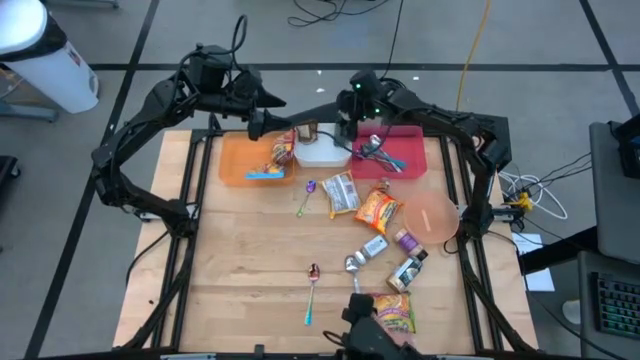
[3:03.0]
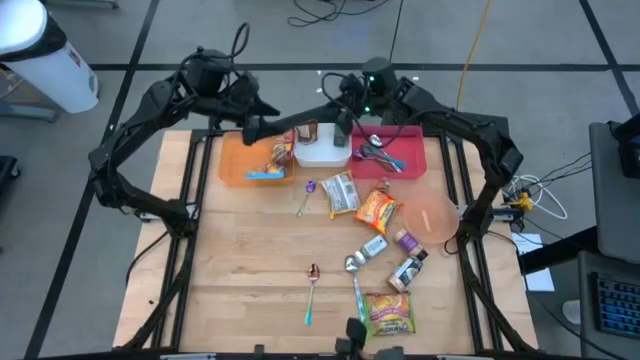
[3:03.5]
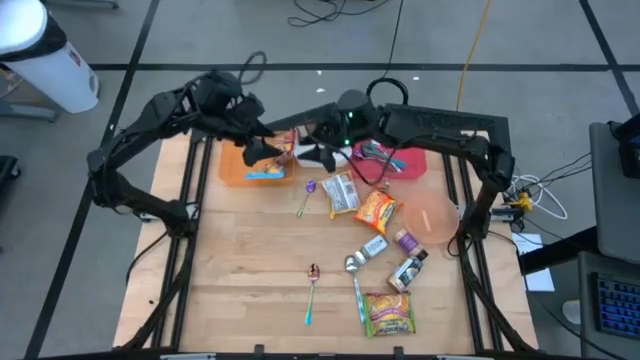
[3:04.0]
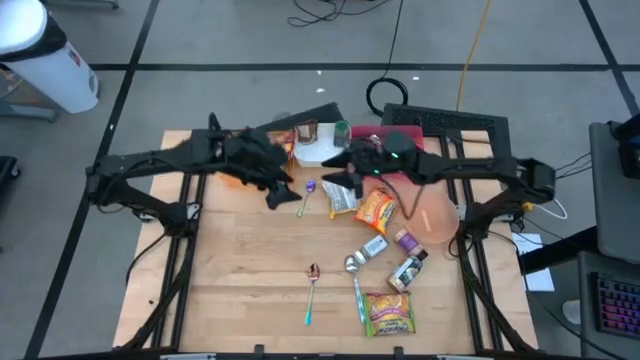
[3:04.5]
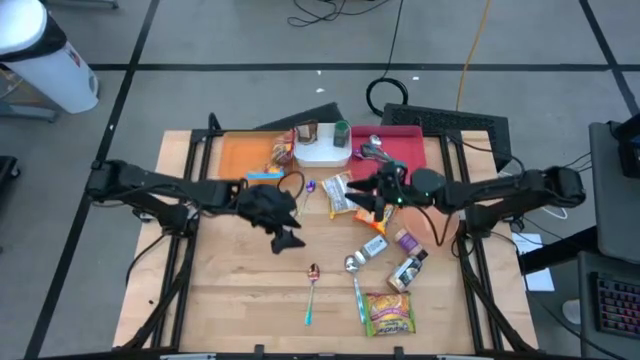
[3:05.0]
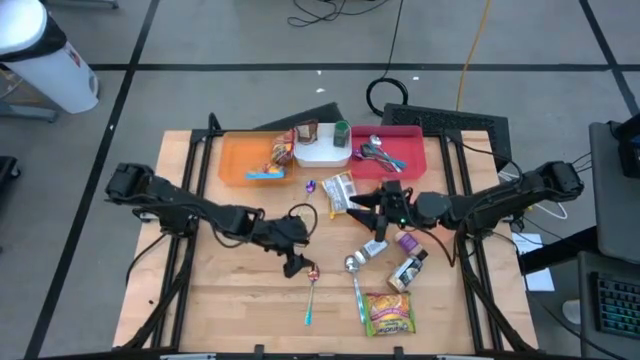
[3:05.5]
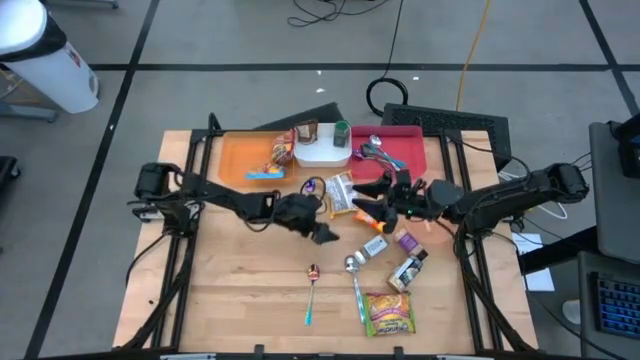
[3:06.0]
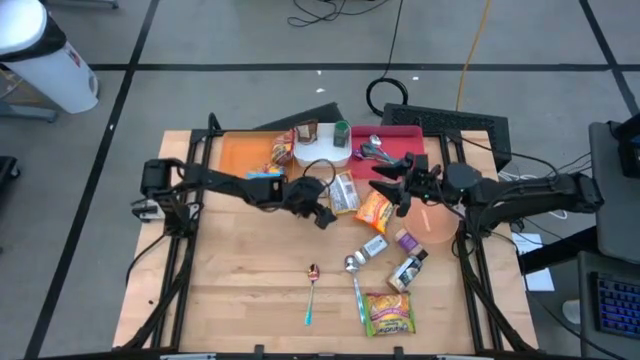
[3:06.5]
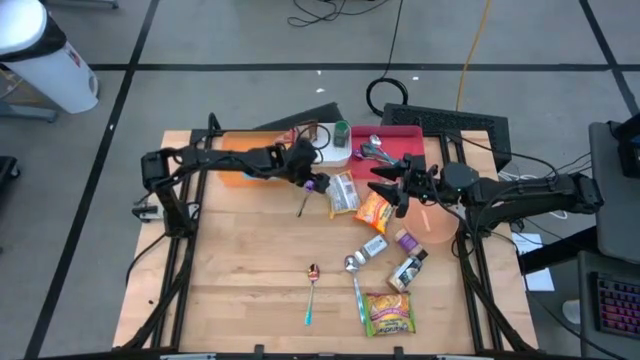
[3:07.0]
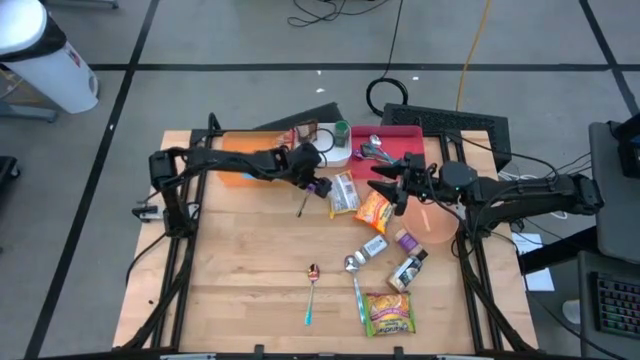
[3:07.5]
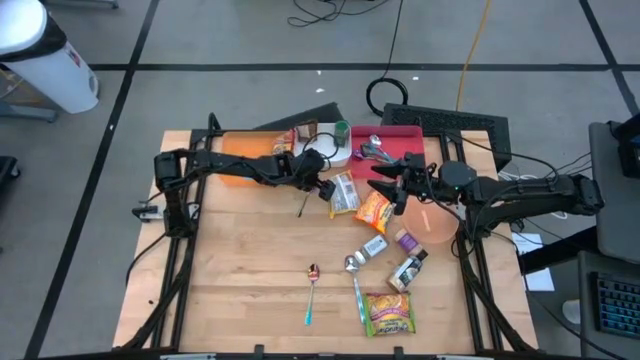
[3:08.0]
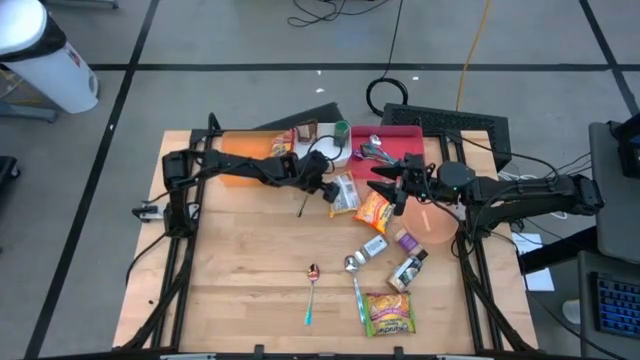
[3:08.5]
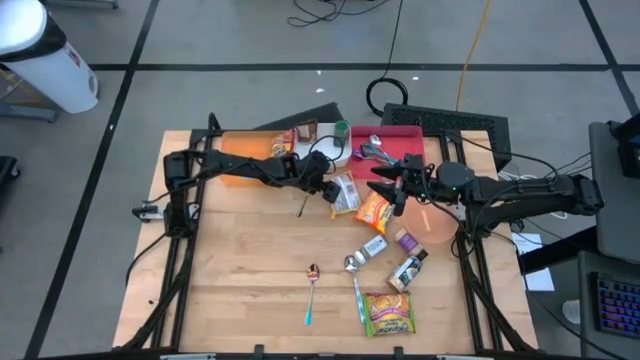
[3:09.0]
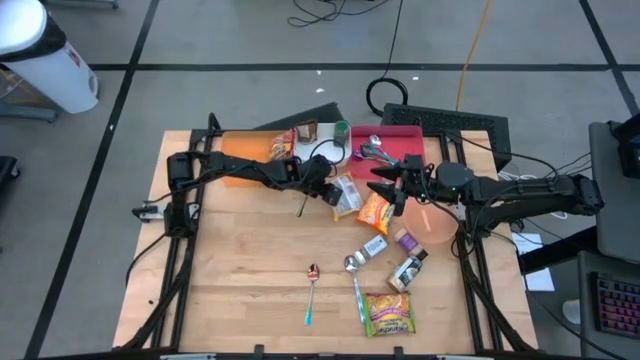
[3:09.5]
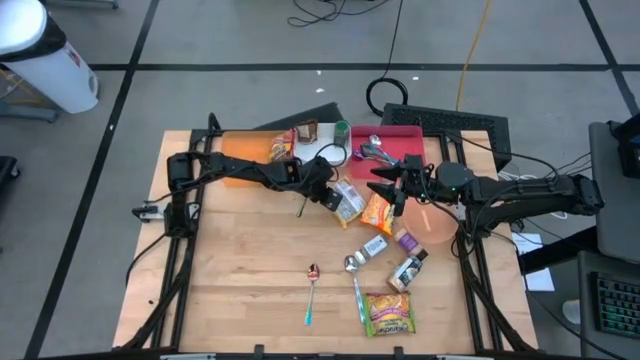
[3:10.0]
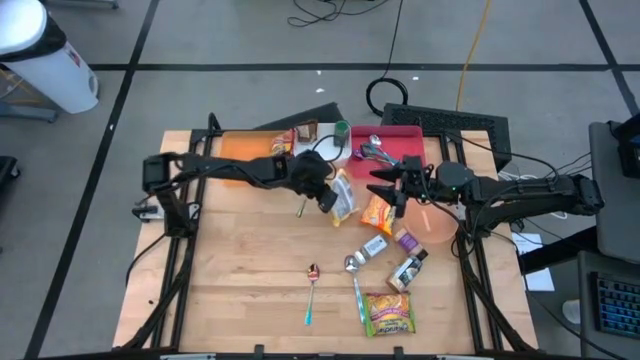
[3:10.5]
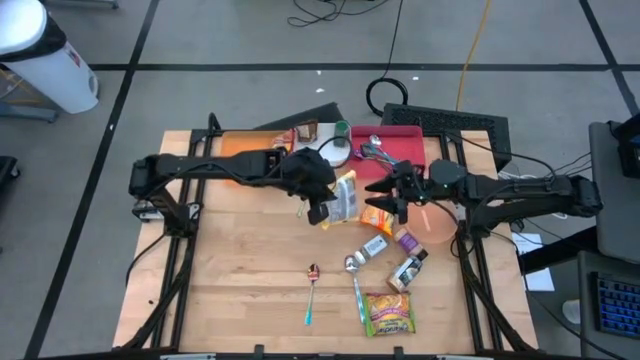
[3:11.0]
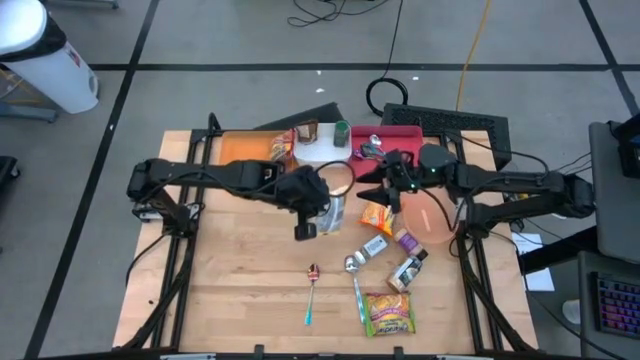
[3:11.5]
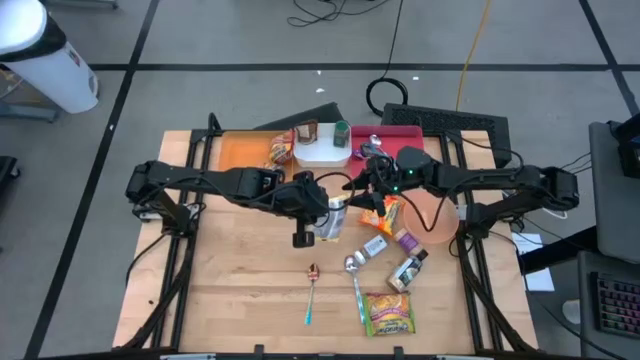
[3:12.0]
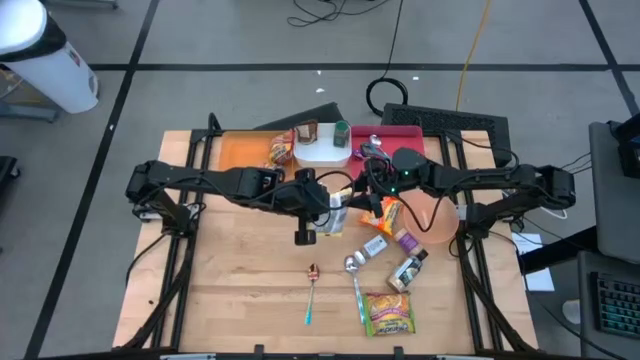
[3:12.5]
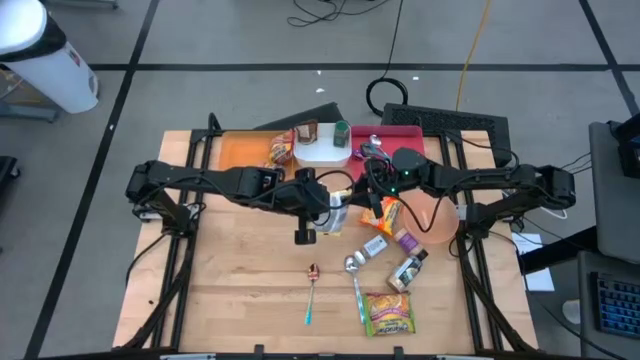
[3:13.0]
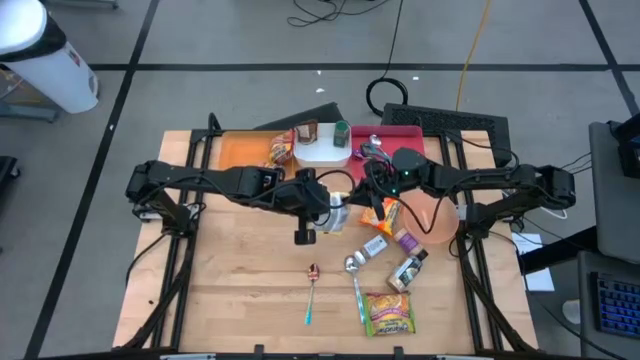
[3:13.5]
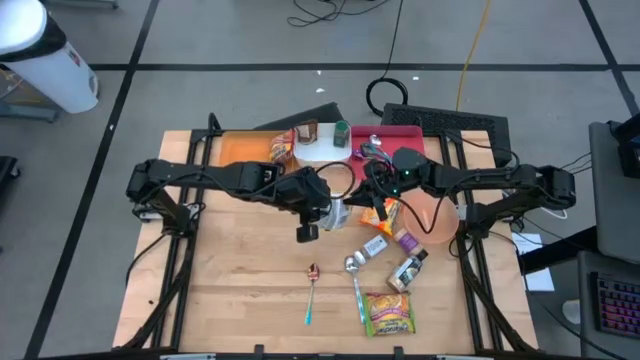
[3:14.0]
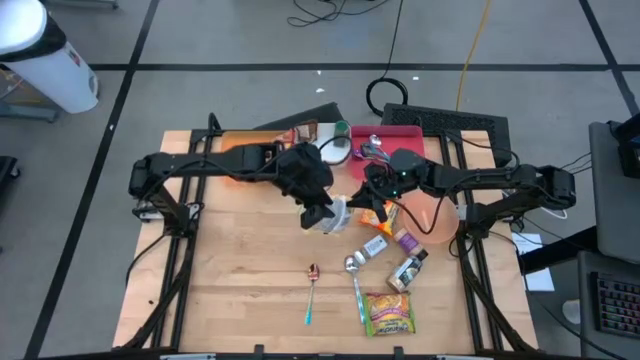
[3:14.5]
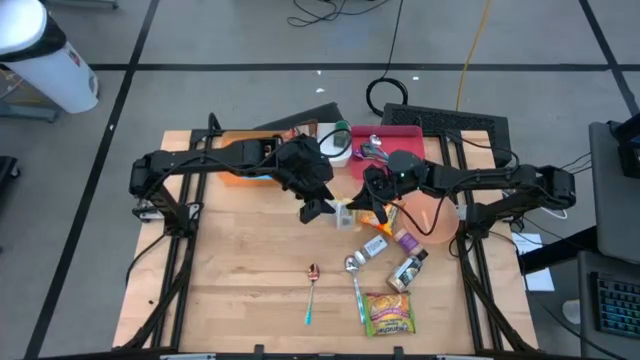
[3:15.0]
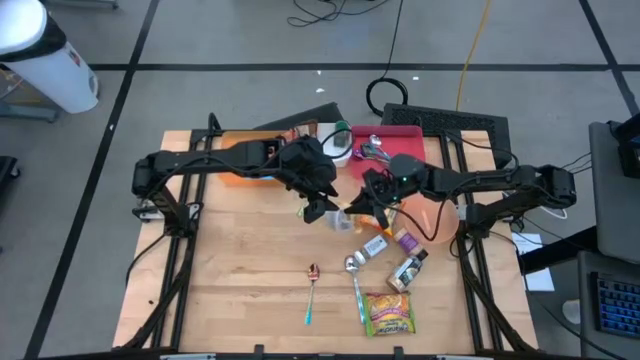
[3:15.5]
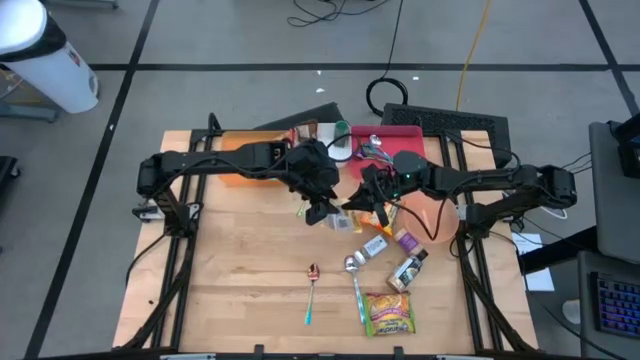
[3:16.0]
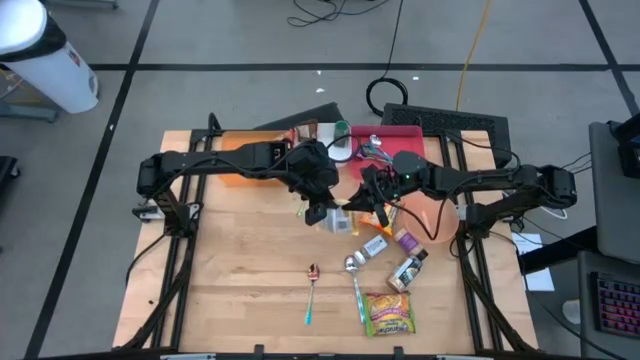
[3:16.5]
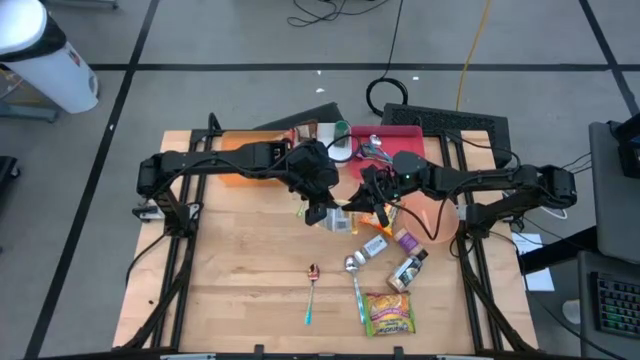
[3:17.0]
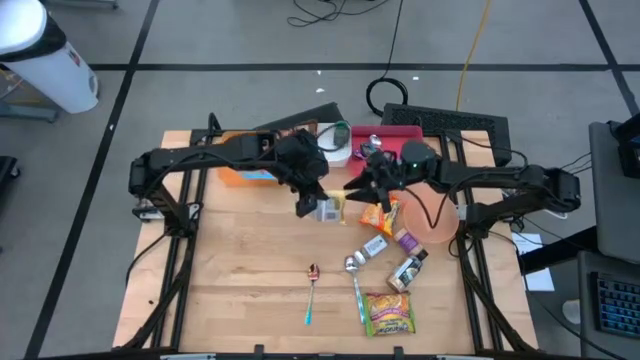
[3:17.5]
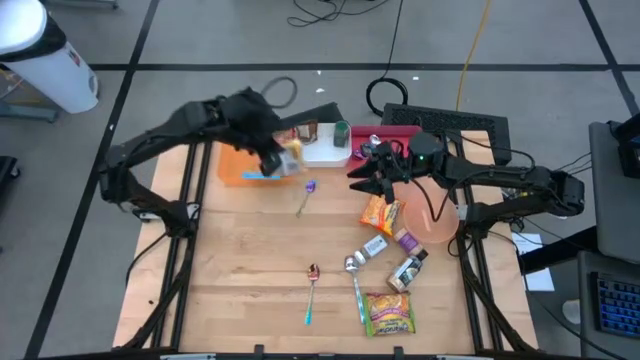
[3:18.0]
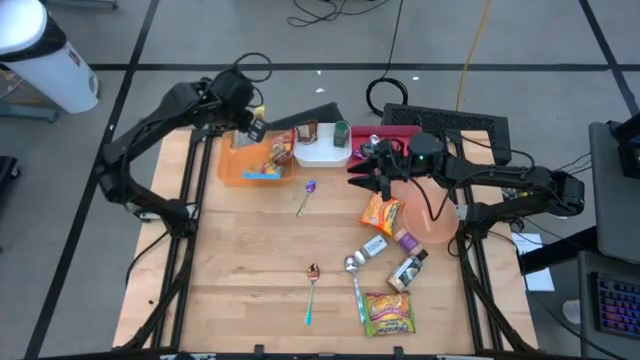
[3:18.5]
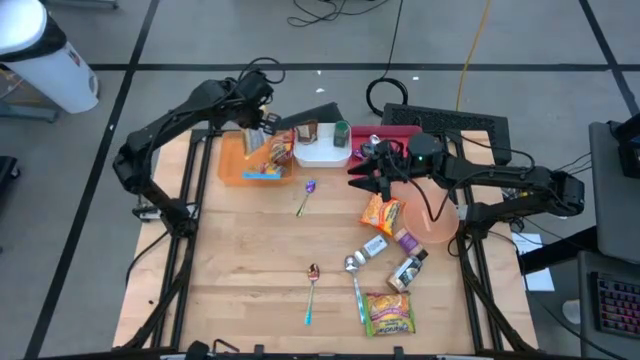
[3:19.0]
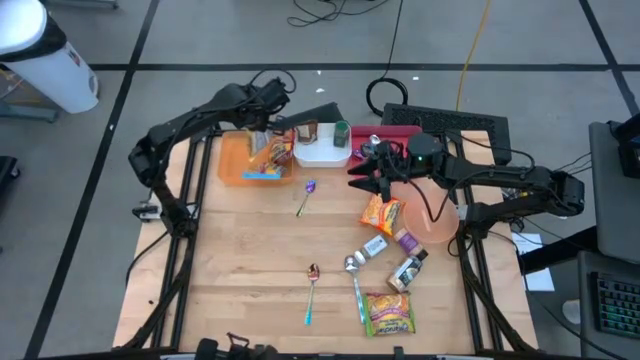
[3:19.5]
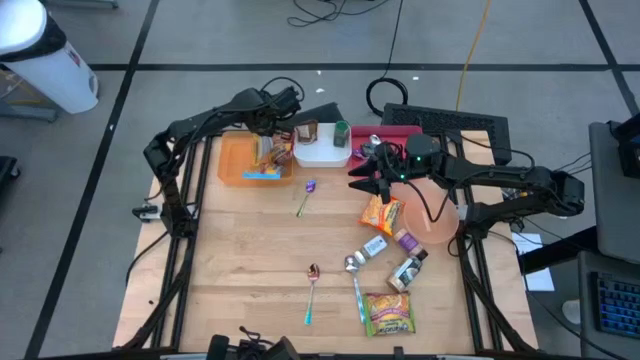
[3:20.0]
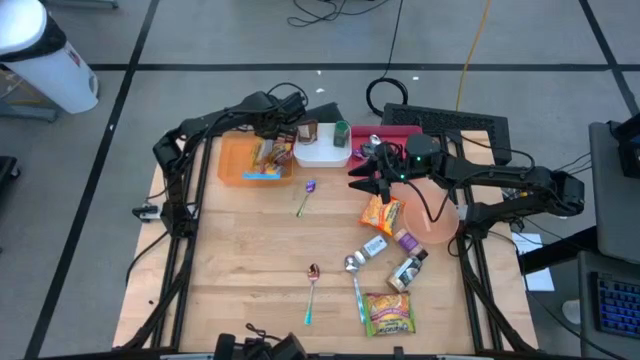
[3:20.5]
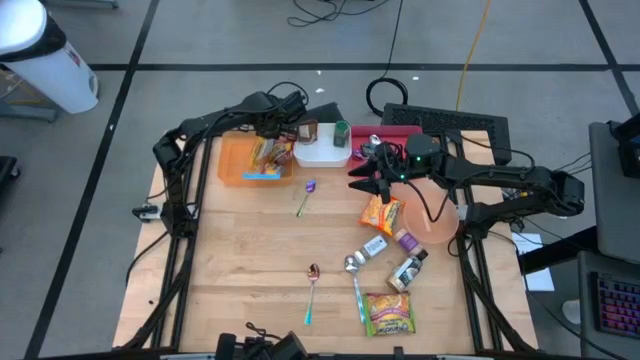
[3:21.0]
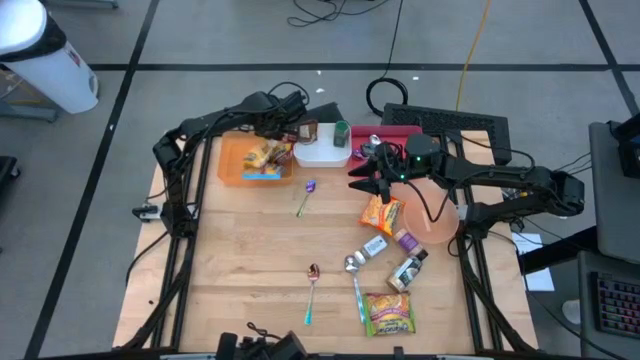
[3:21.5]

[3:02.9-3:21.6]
Task: Pick & Place Food Item
Put the yellow noodle pack into the orange bin
